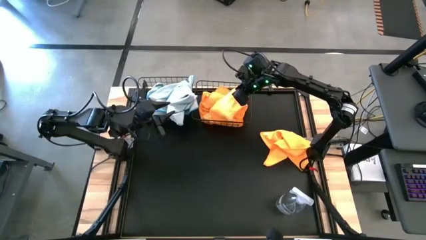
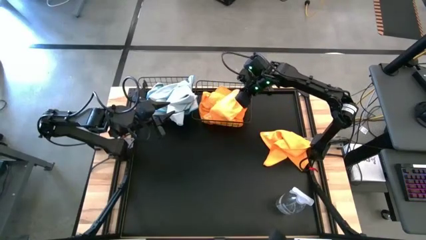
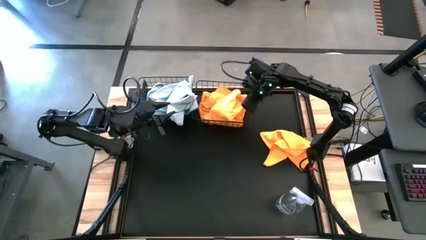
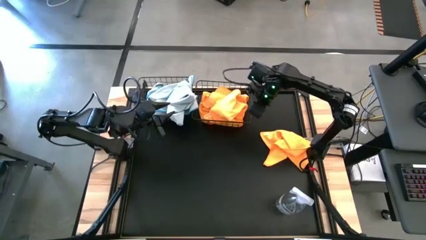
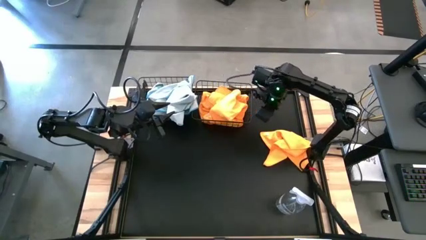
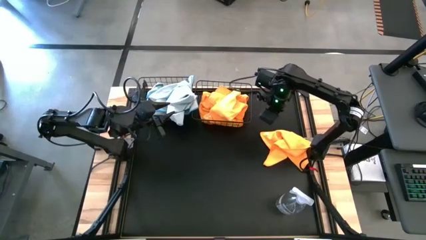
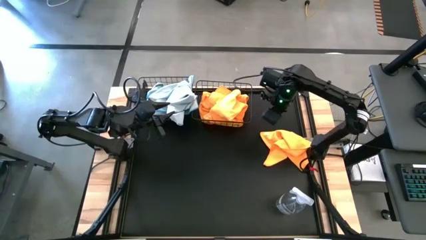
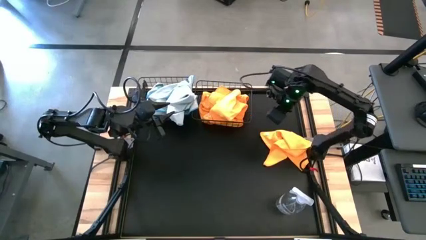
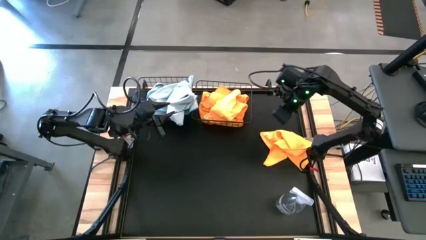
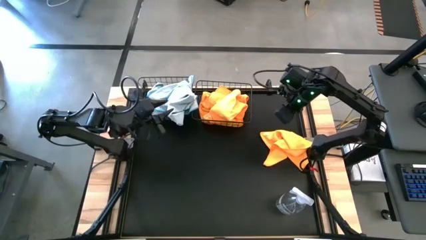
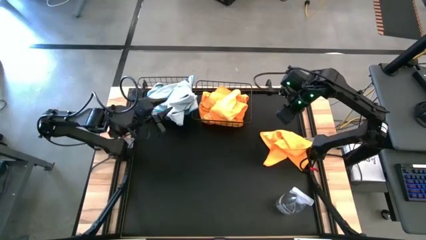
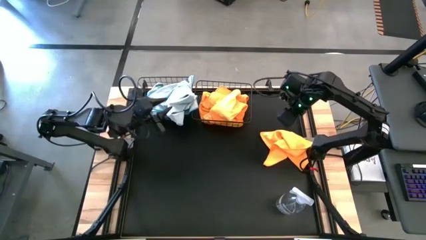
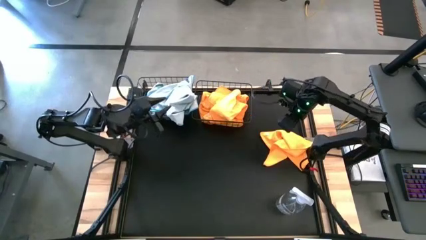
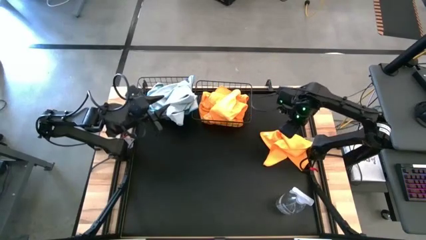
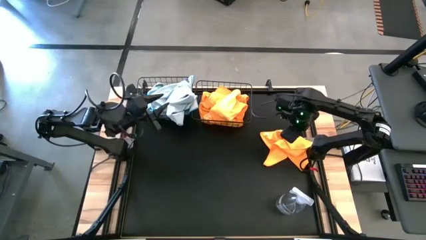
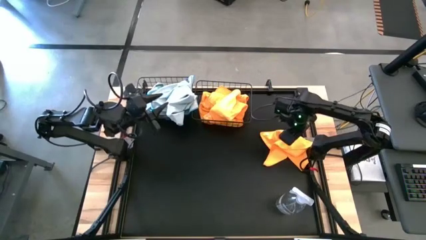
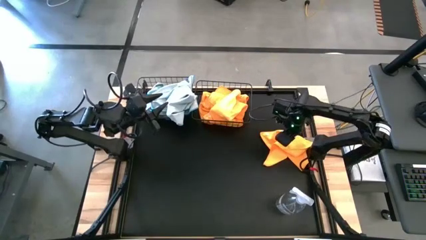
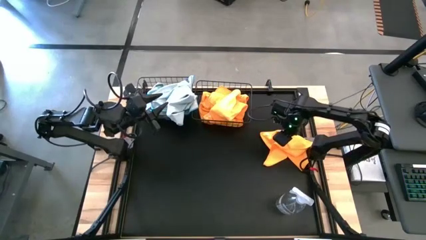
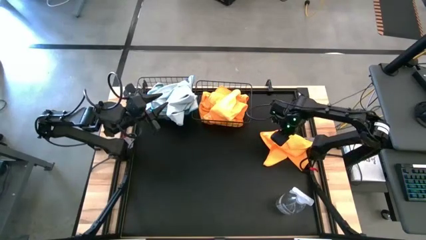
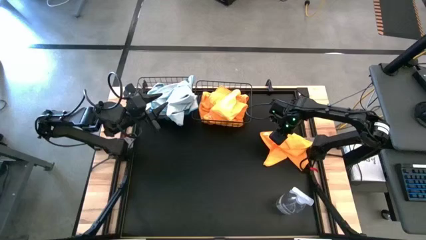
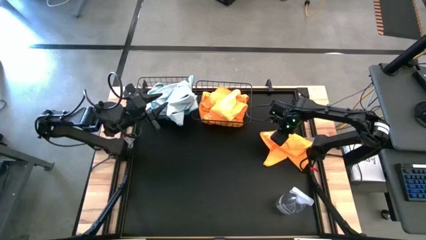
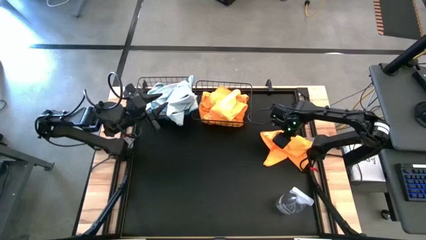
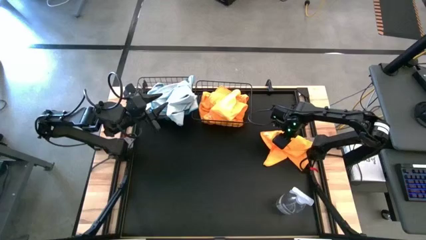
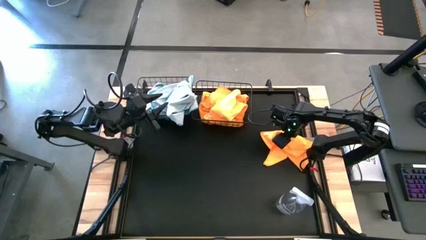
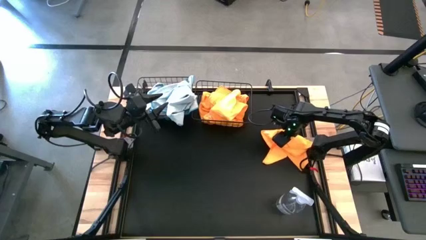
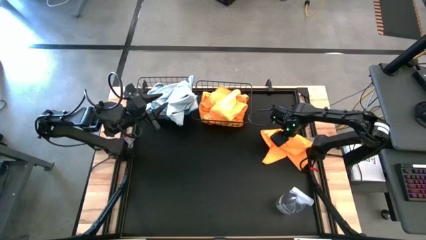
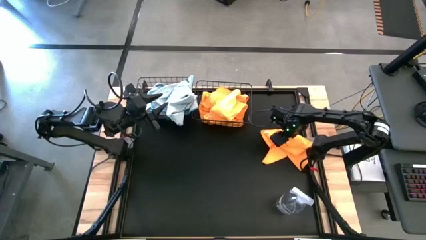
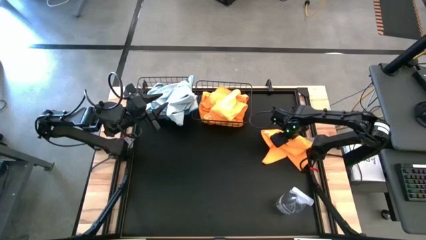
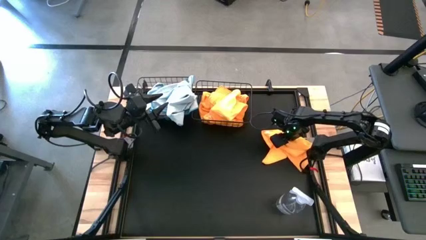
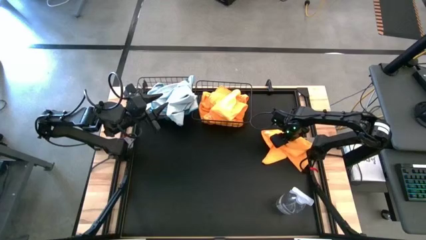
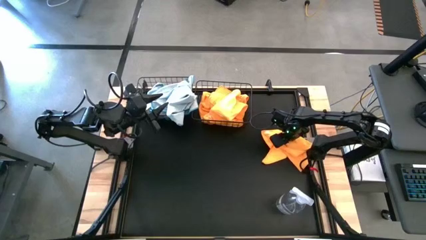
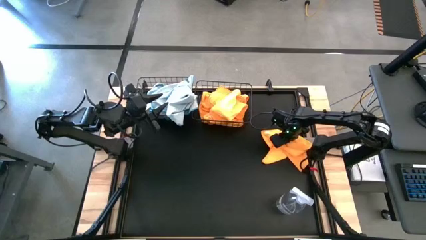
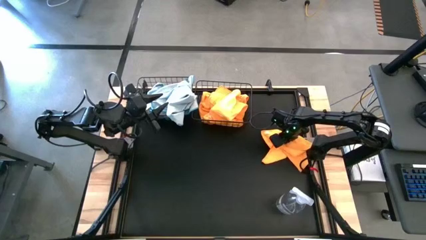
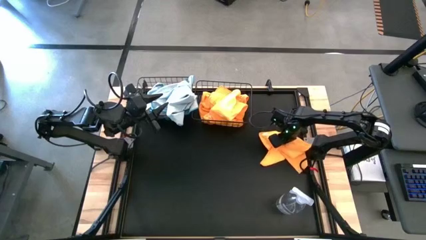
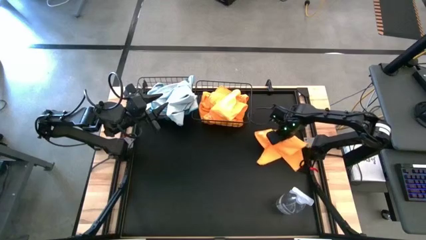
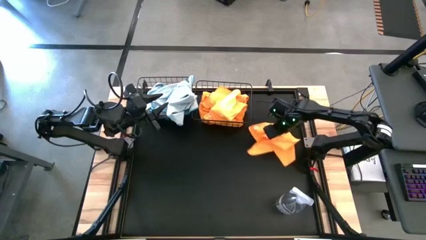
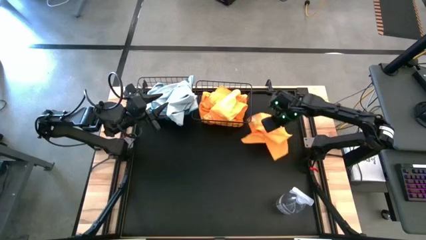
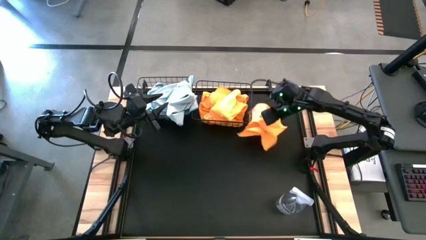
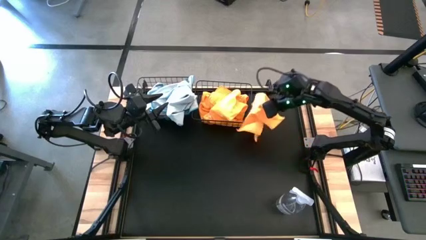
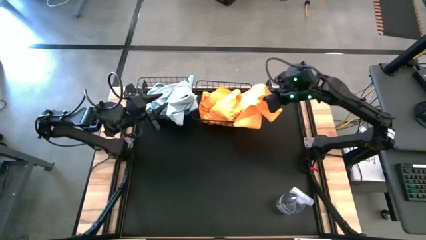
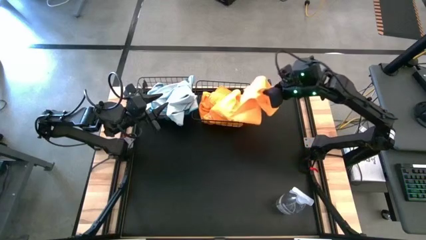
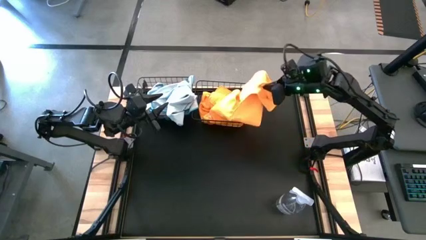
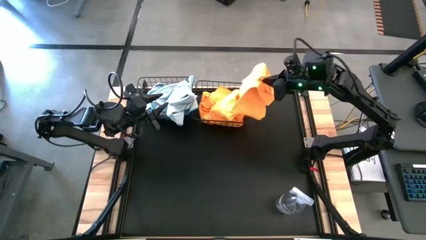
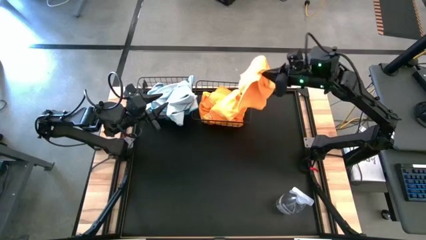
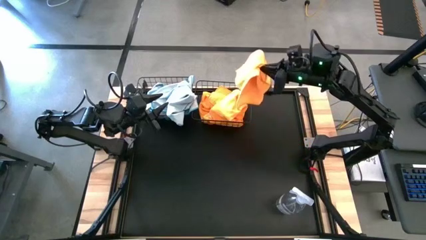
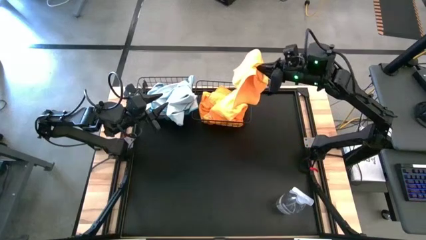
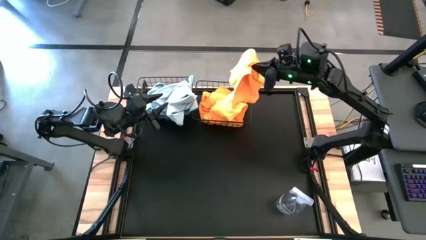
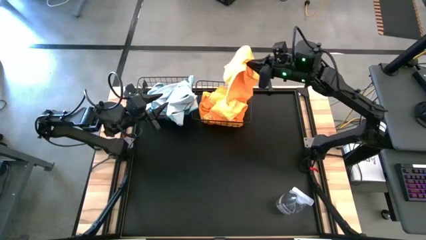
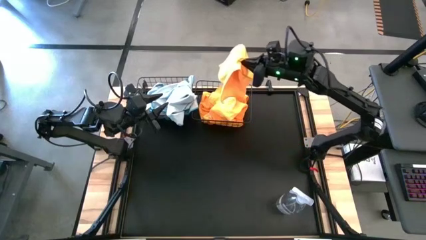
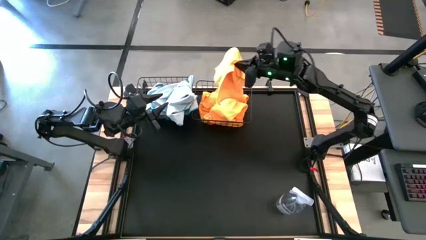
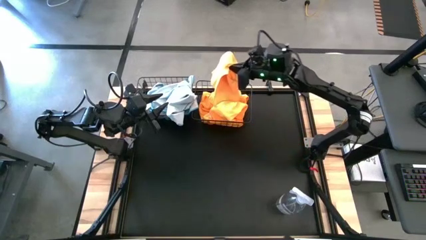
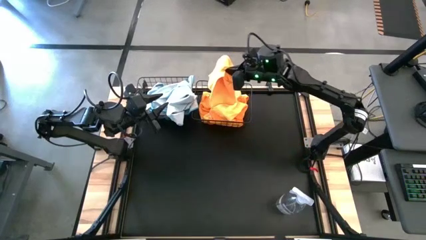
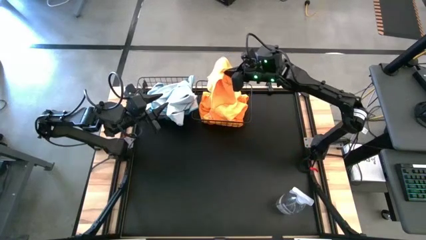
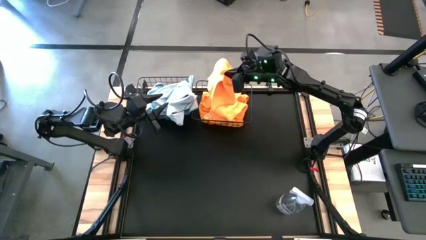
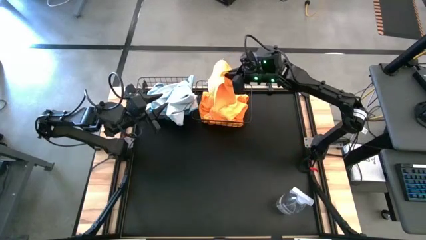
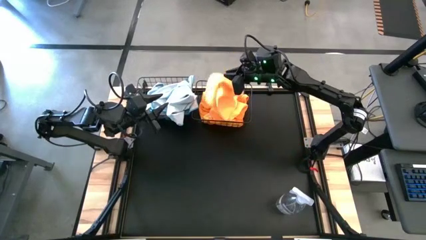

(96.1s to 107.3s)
Task: Sort microfiber towel by color & place in baskets
Put the yellow towel into the right black wire basket

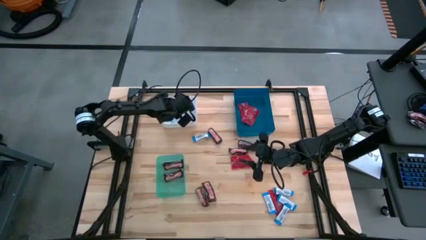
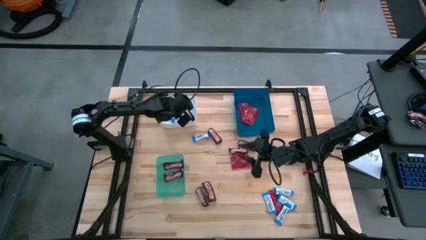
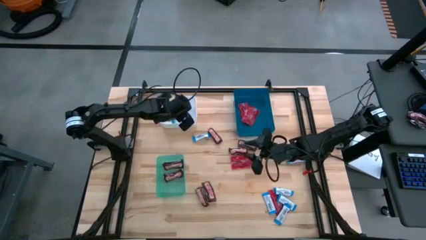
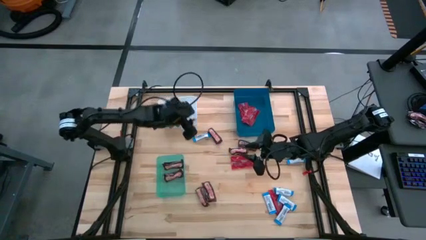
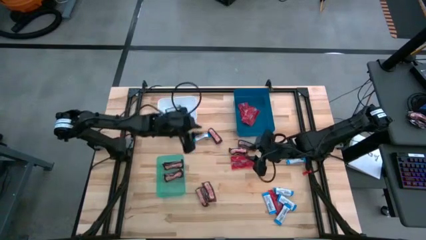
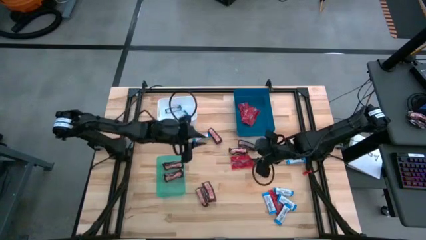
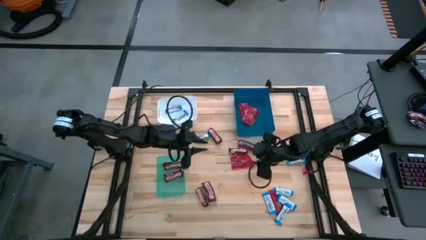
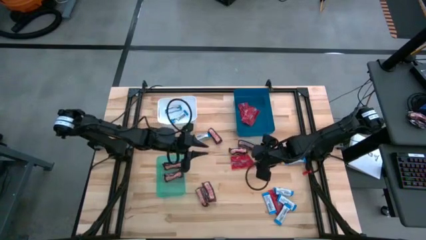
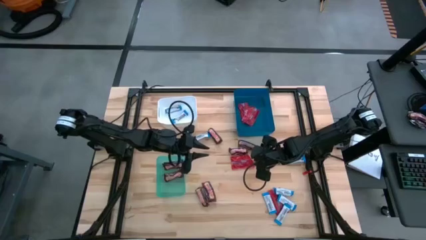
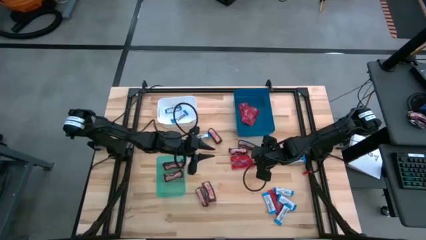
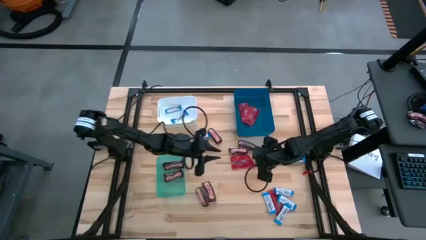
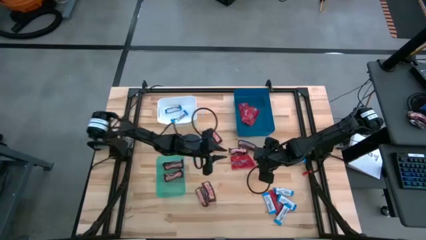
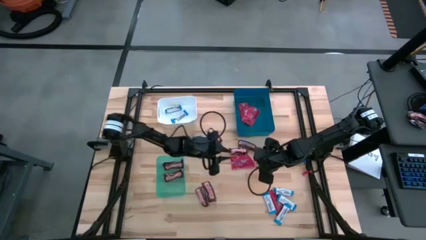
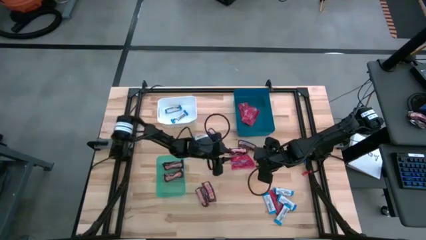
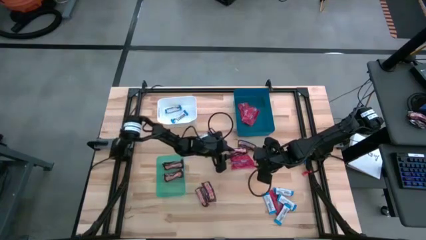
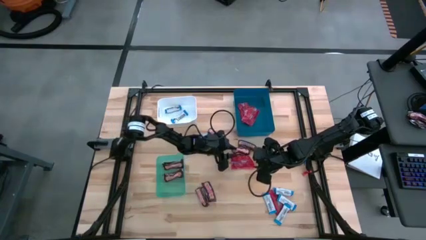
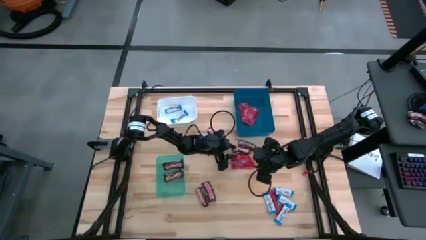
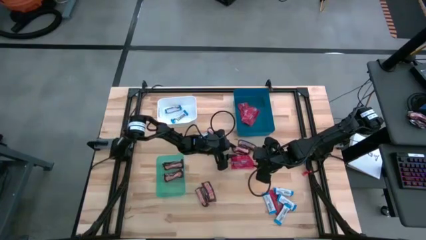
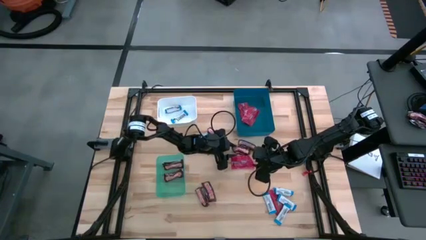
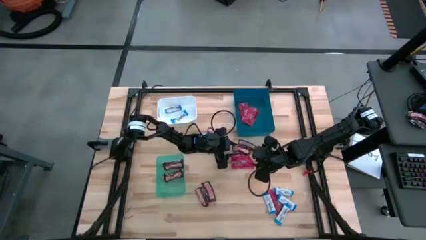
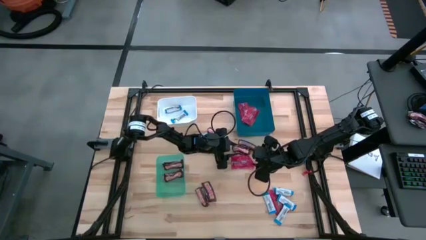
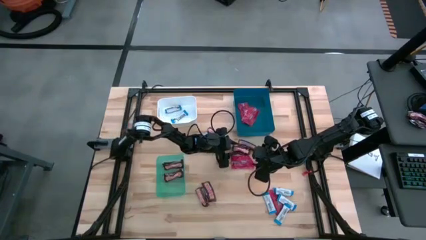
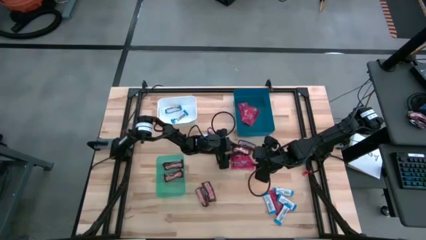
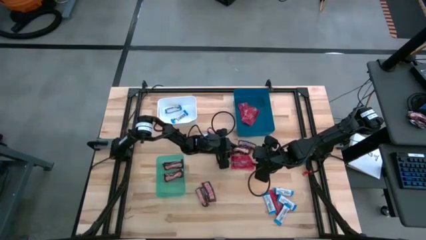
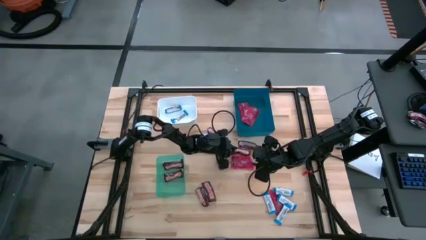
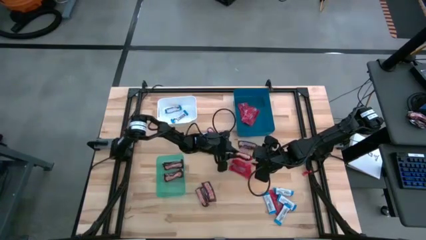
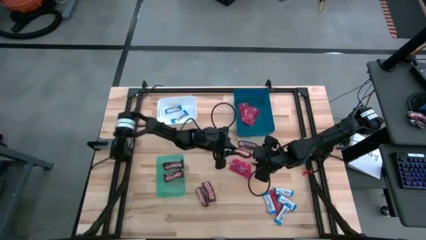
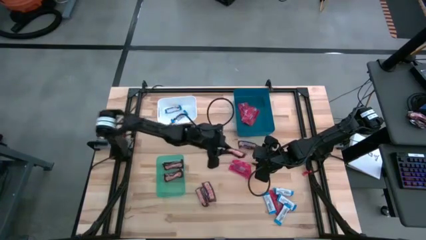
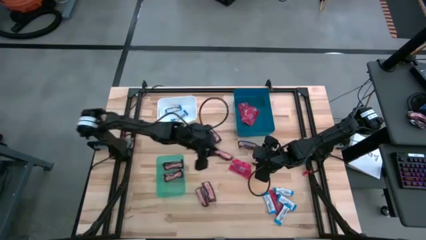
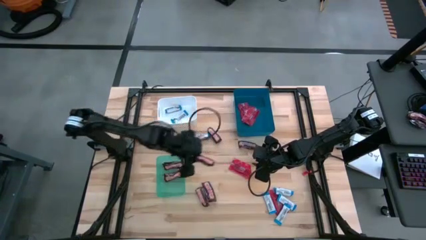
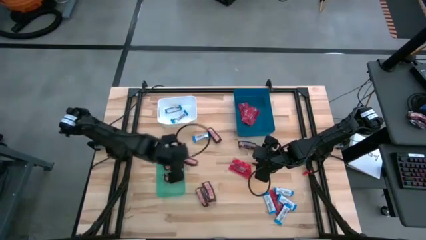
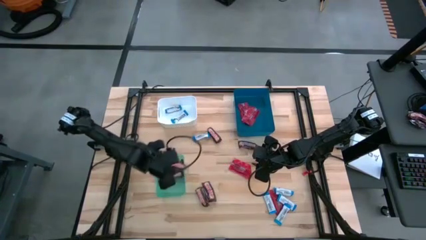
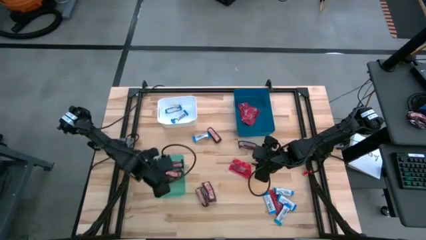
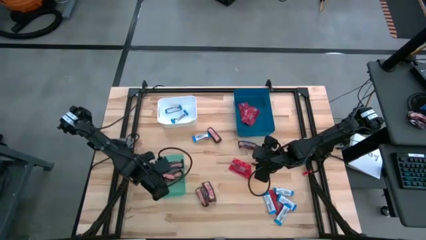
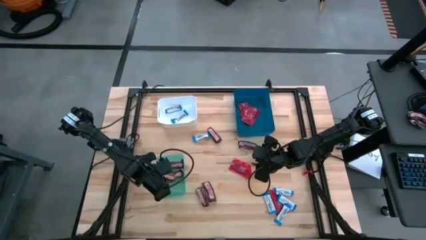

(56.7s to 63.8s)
Task: Sort candy
Put the brown chocolate bar into the green bin
